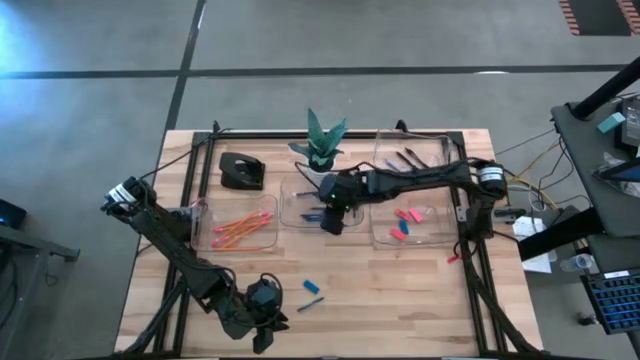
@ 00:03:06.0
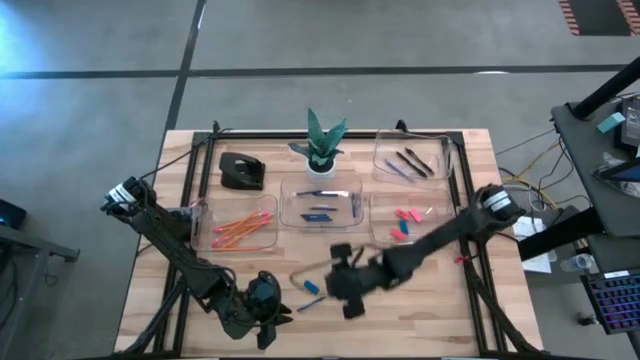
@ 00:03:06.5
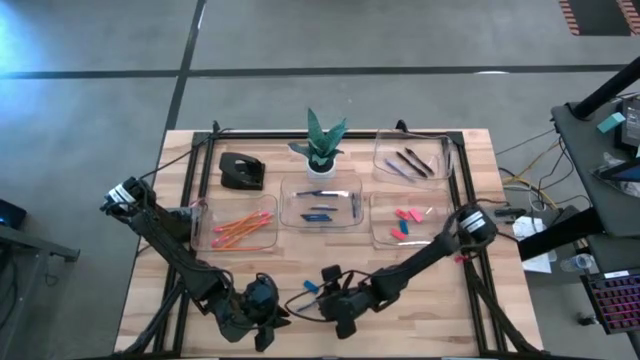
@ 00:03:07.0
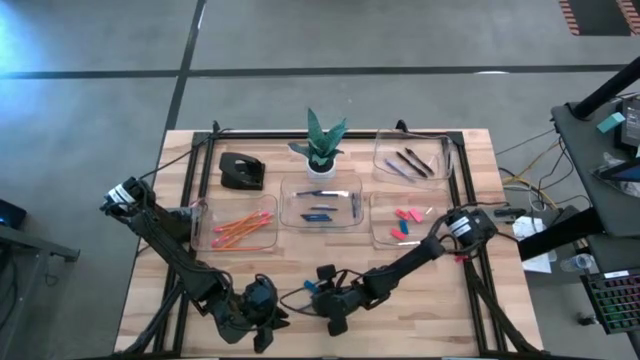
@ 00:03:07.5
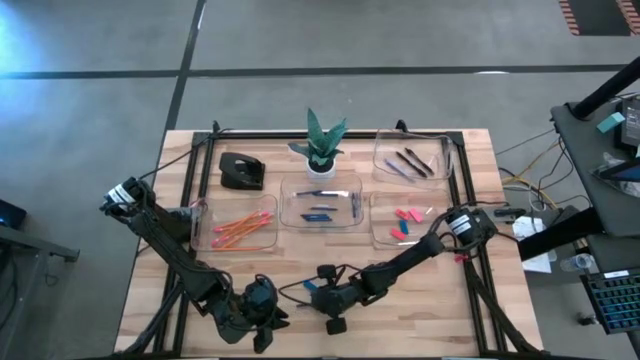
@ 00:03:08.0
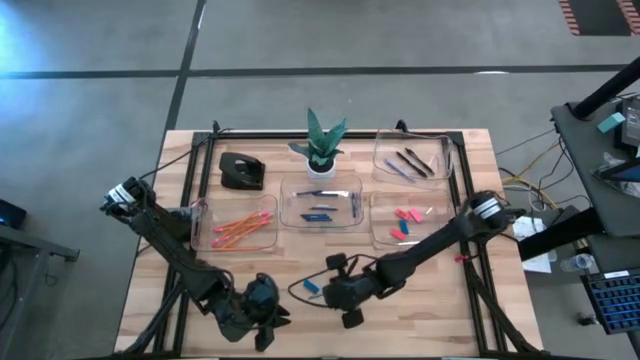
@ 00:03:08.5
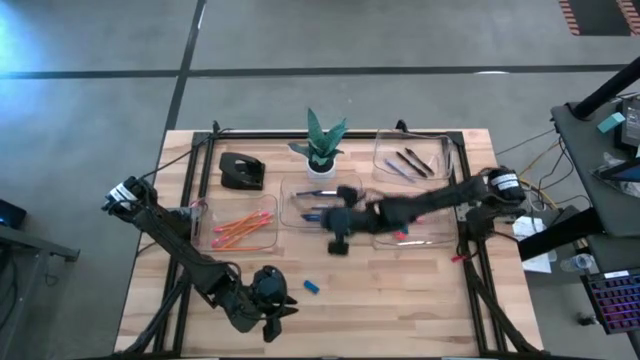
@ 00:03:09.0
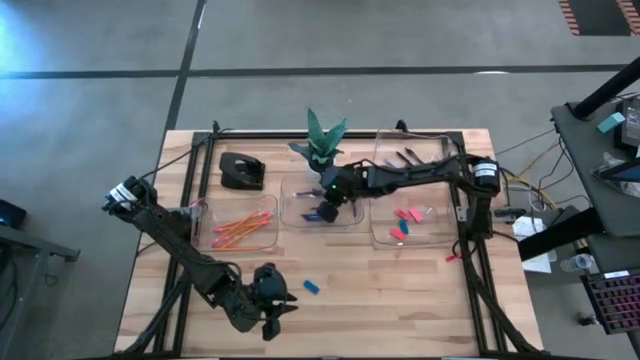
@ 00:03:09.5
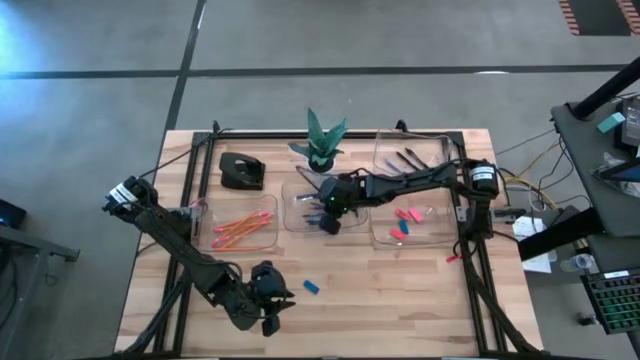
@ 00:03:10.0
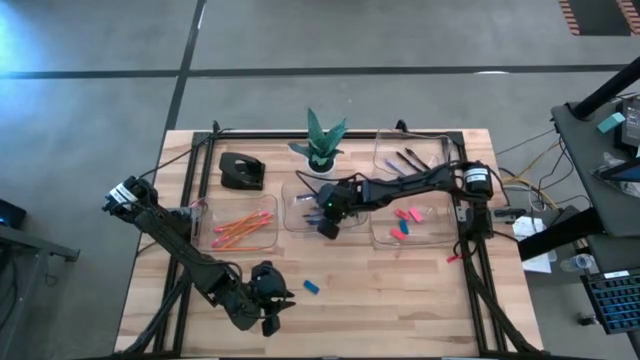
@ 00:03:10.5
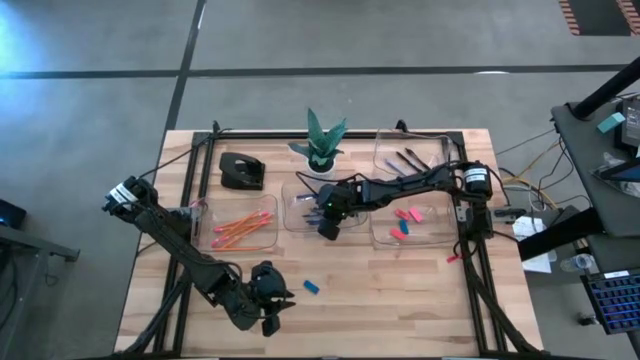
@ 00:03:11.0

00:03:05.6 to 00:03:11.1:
Task: Sort crayons/erasers/pens/pencils in bins
Put the blue crayon into the middle transparent bin

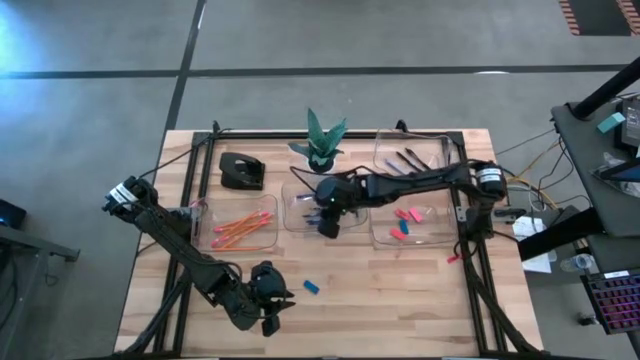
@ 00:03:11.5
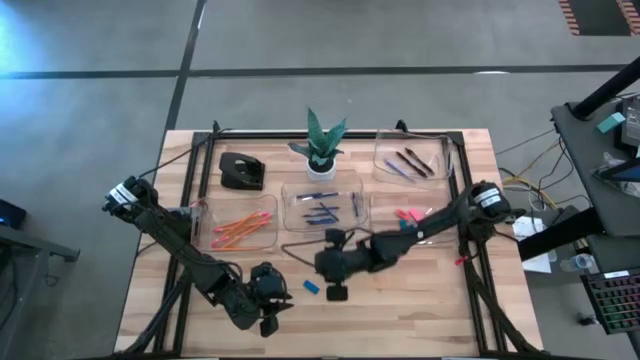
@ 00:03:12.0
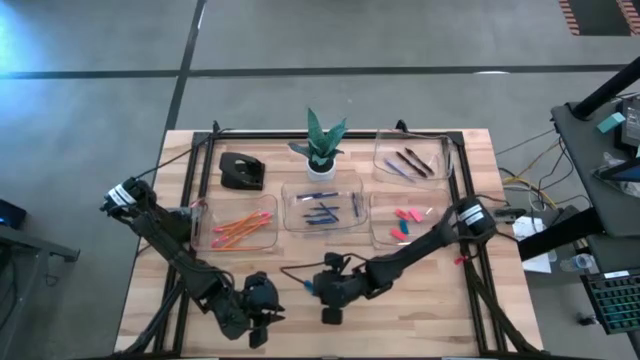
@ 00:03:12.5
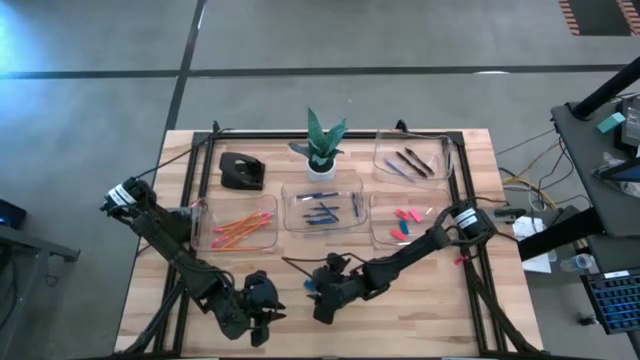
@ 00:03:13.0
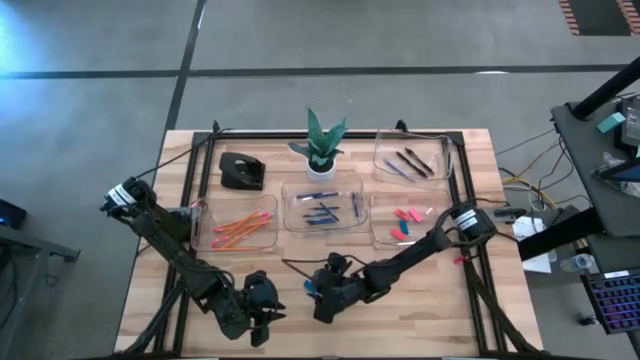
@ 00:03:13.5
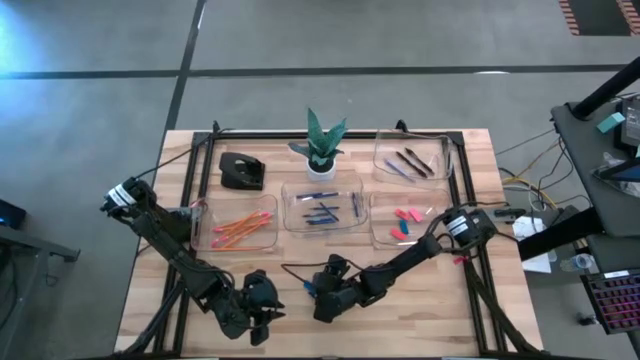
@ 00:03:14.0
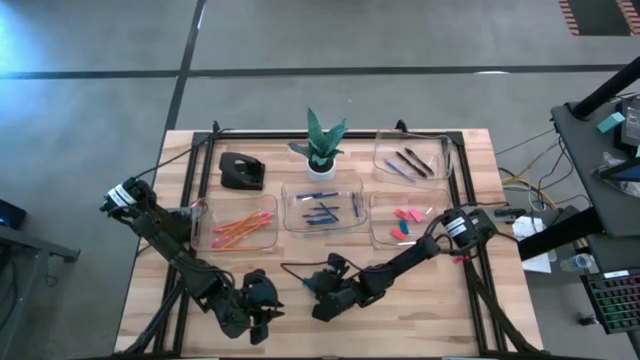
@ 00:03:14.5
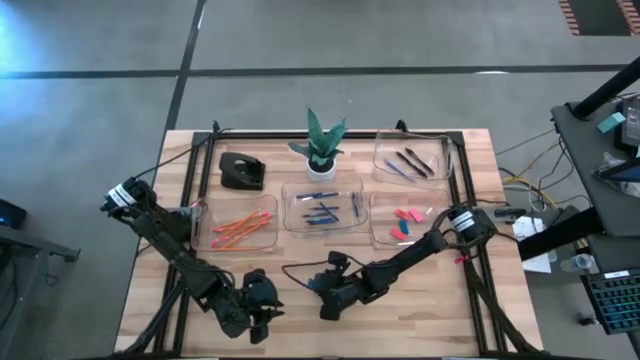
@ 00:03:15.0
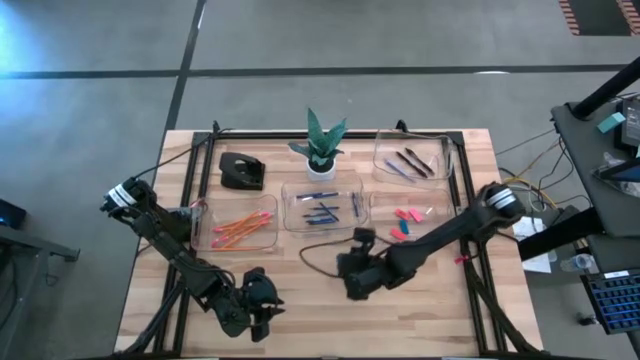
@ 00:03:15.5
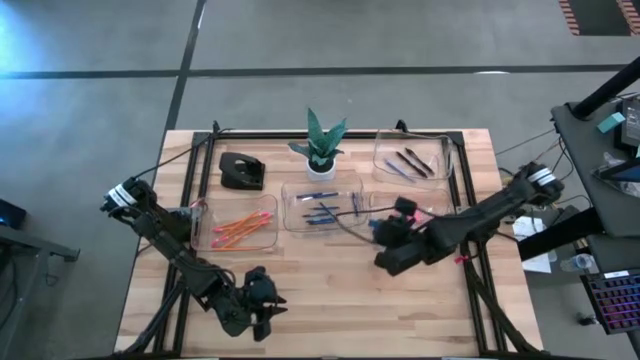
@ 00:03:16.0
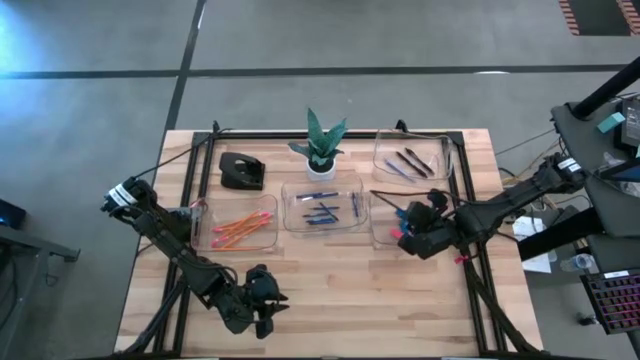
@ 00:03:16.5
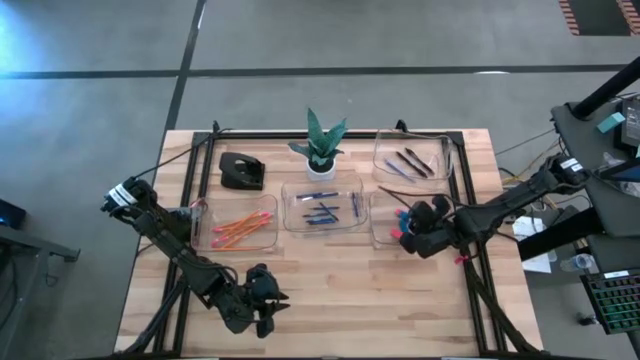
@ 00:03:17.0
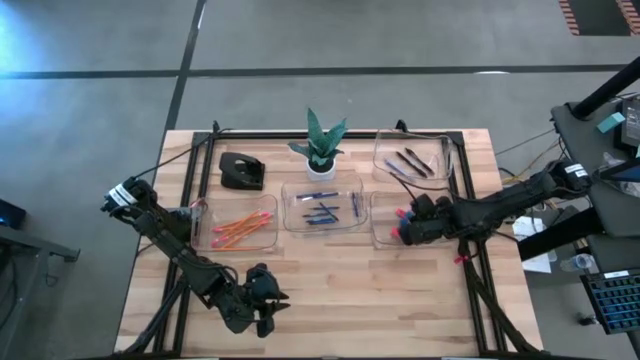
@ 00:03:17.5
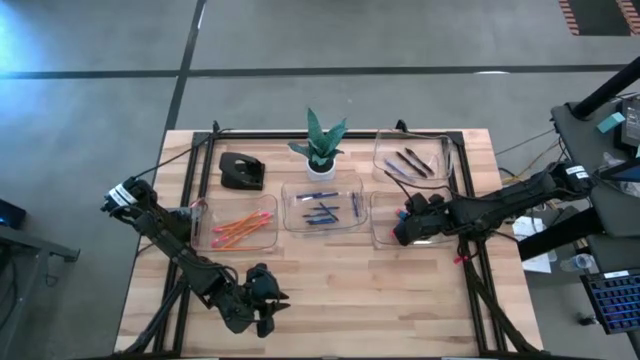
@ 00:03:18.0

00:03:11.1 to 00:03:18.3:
Put the blue eraser into the middle right transparent bin

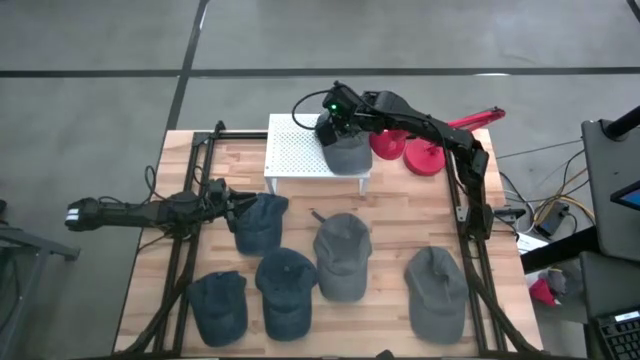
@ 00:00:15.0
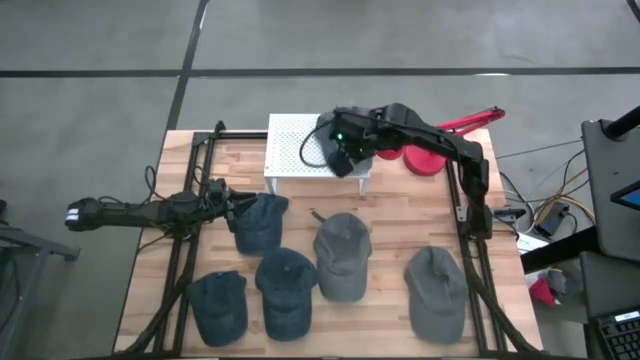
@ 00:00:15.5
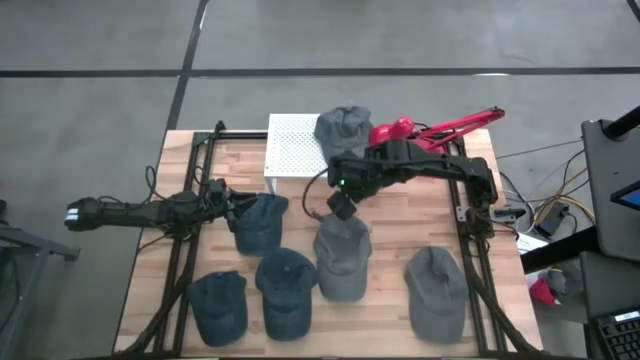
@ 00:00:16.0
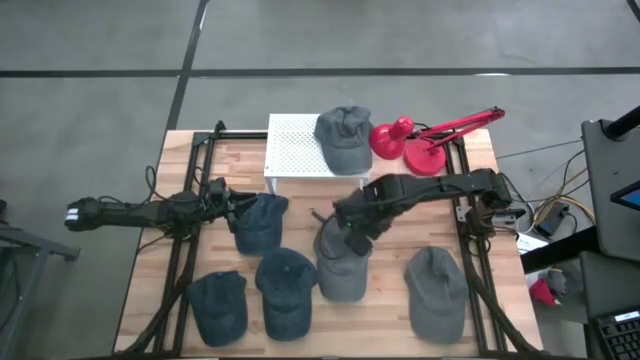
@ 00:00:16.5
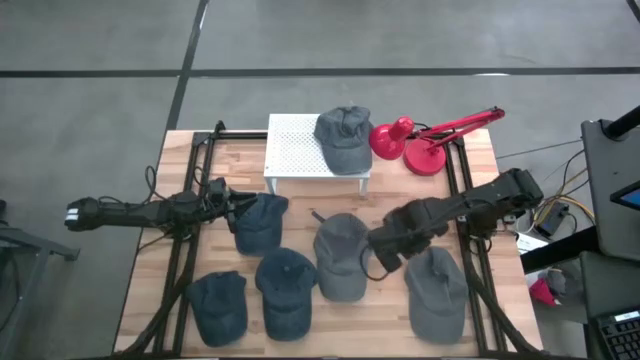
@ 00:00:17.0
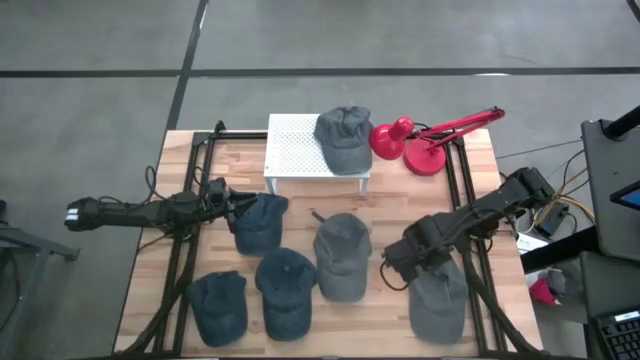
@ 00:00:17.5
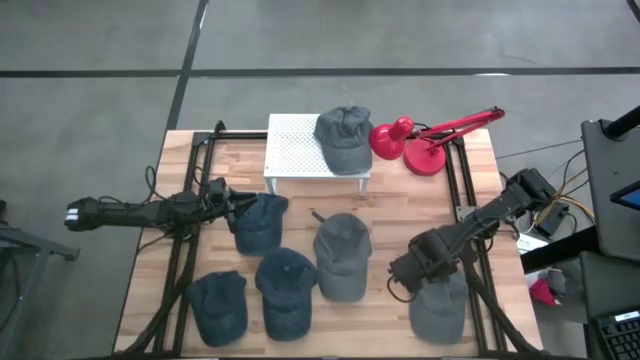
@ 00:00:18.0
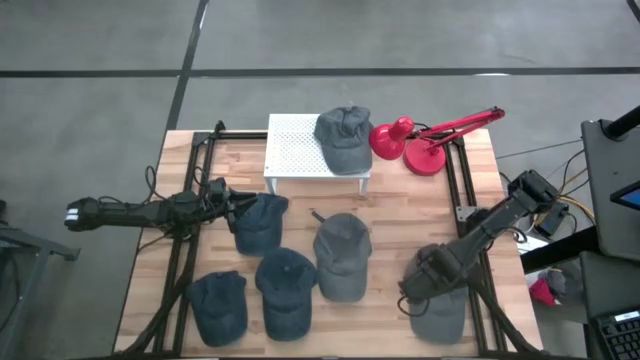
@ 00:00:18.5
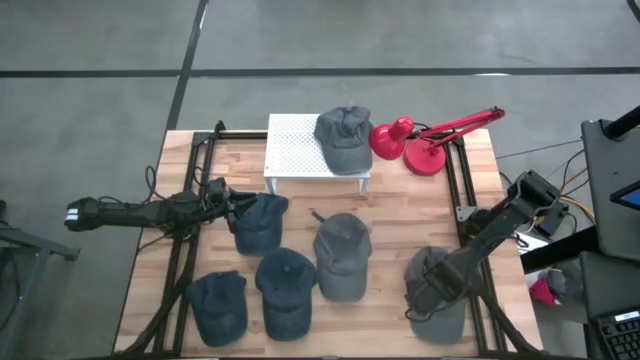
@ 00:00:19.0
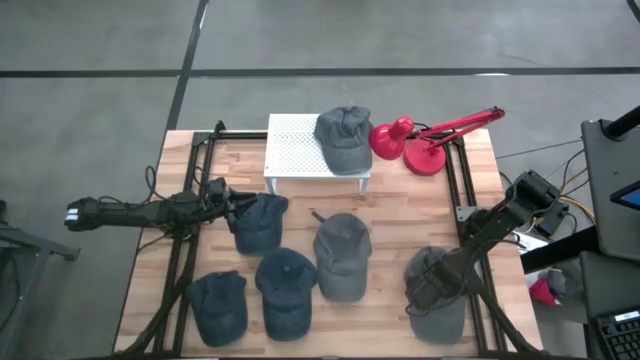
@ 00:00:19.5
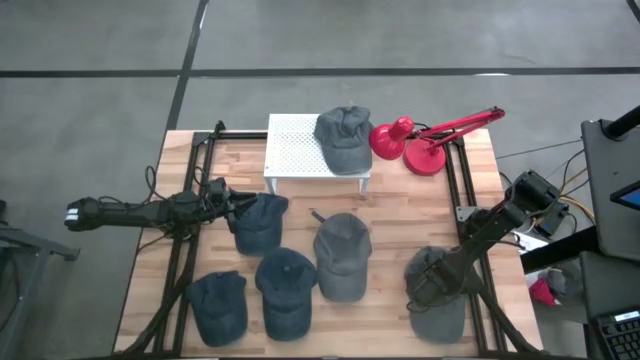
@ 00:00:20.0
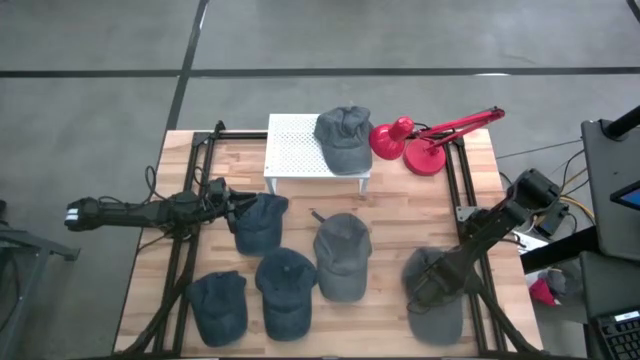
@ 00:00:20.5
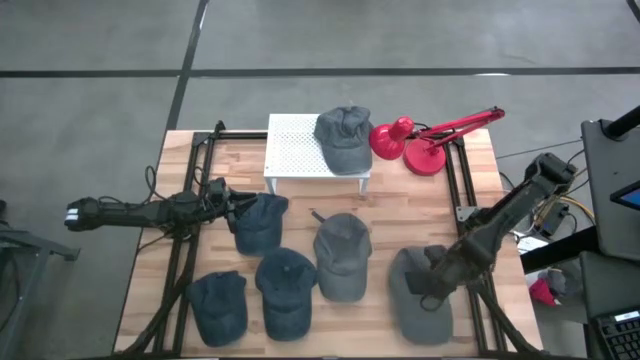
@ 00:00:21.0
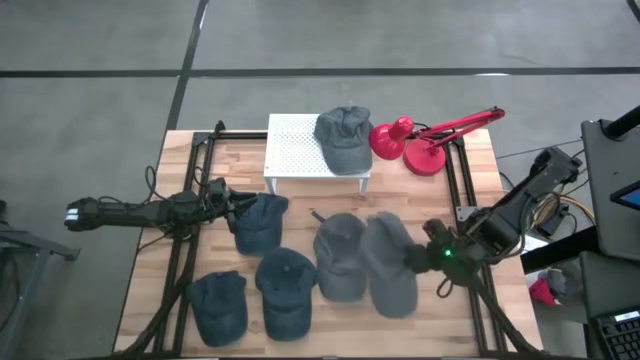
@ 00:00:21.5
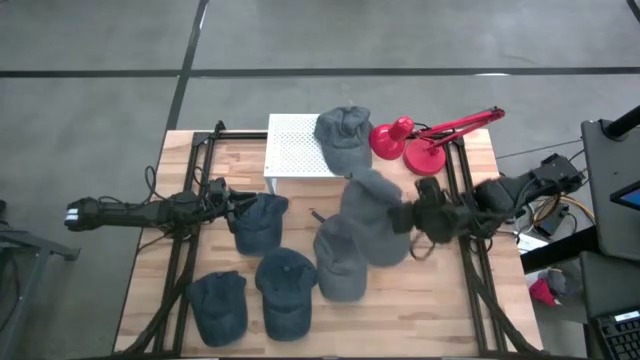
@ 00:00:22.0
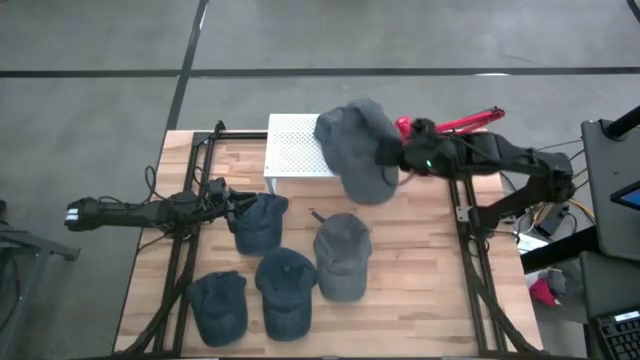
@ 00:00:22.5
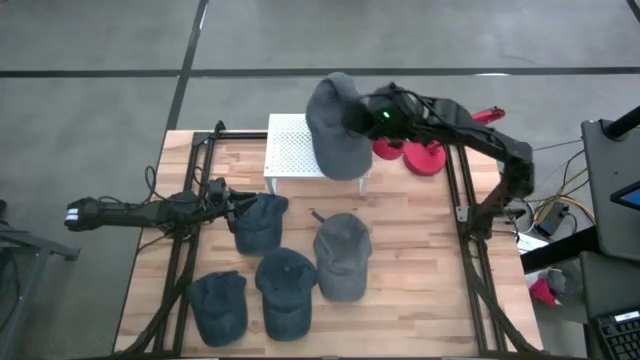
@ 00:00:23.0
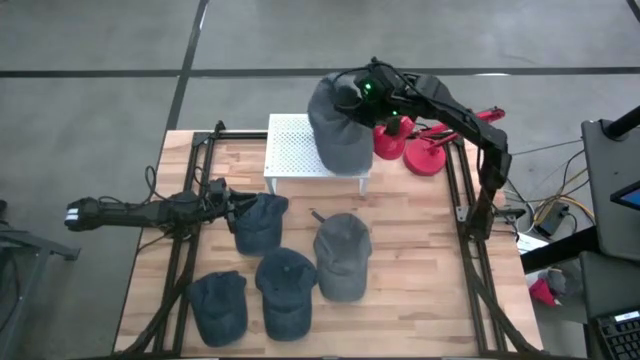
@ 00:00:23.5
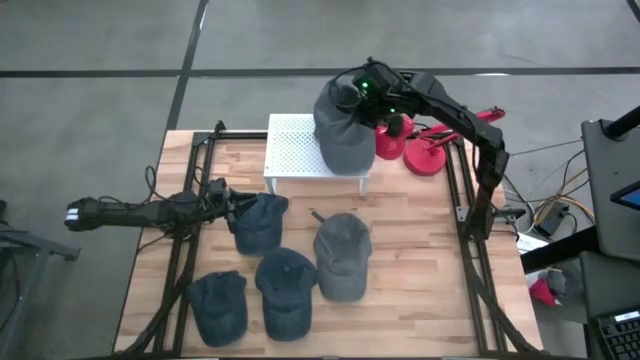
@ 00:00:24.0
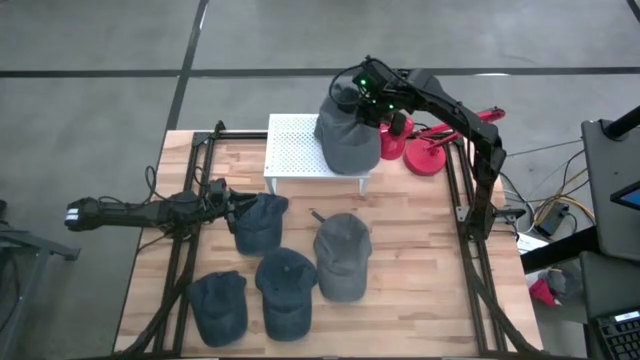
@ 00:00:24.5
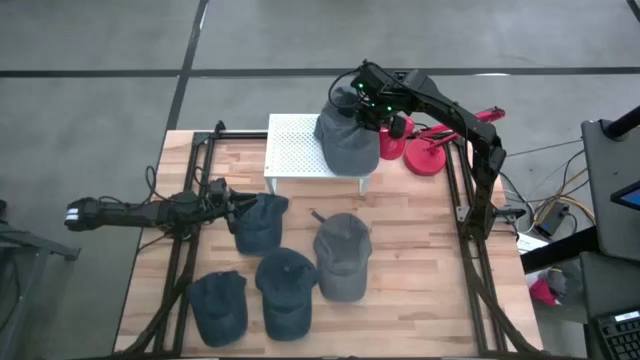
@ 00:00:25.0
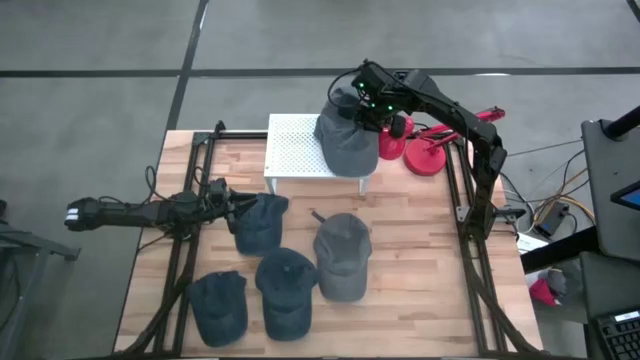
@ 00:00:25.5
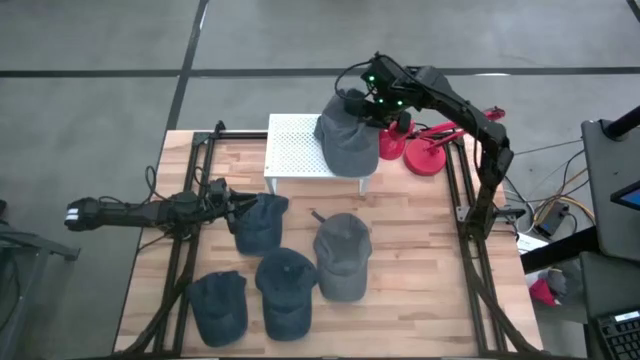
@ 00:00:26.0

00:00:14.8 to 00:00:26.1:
Task: Pick & Place hat
Stack the right gray cap on top of the gray cap on the shelf
